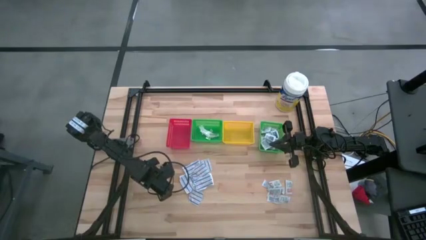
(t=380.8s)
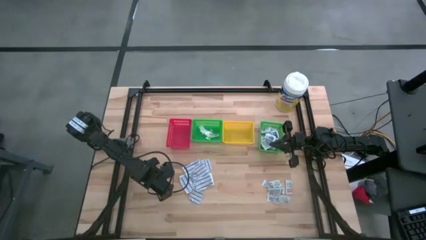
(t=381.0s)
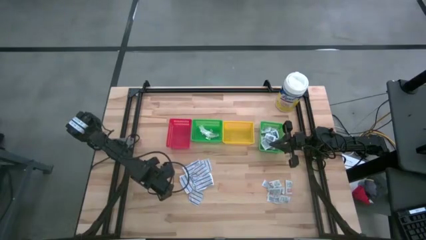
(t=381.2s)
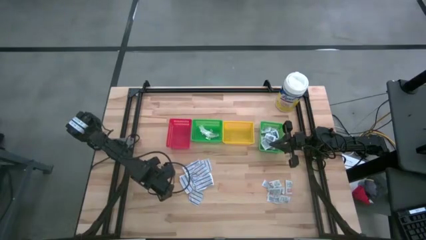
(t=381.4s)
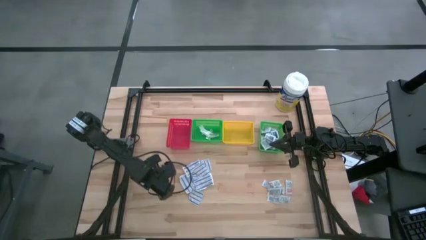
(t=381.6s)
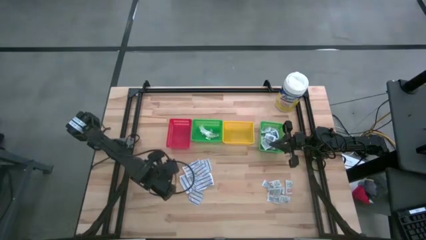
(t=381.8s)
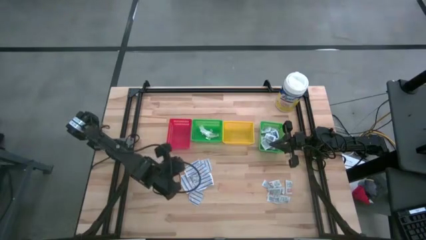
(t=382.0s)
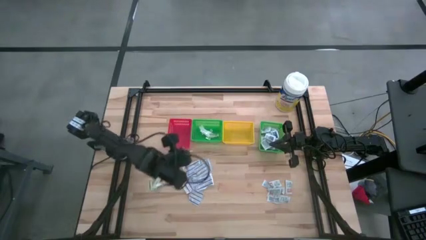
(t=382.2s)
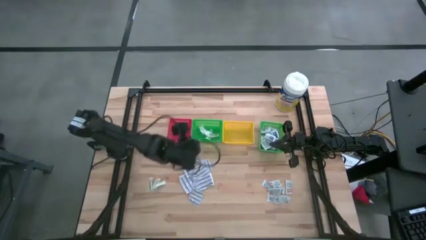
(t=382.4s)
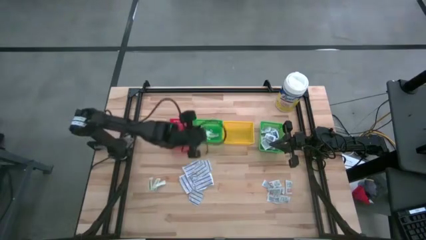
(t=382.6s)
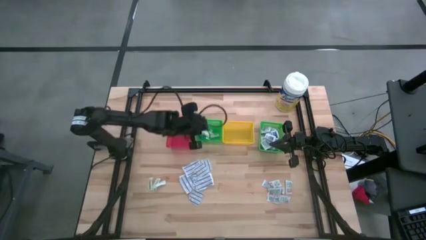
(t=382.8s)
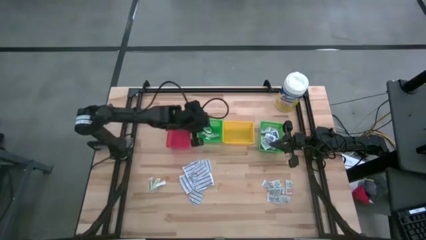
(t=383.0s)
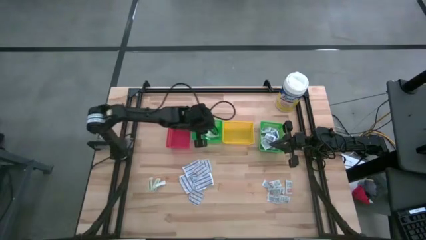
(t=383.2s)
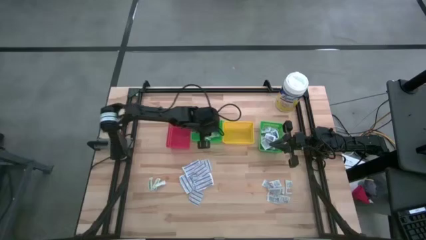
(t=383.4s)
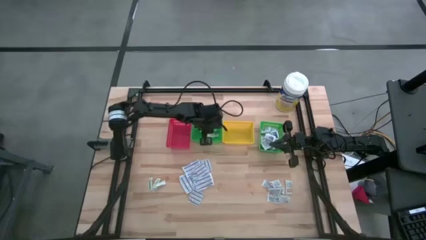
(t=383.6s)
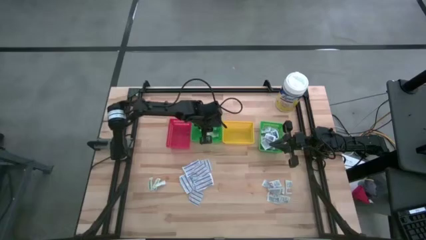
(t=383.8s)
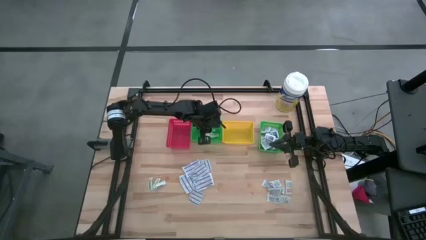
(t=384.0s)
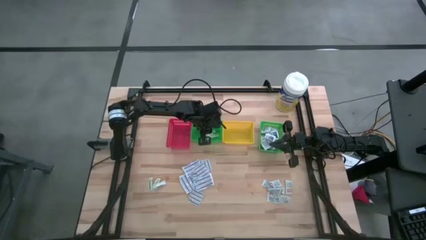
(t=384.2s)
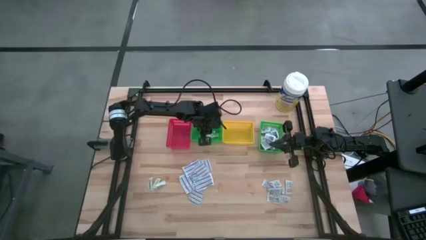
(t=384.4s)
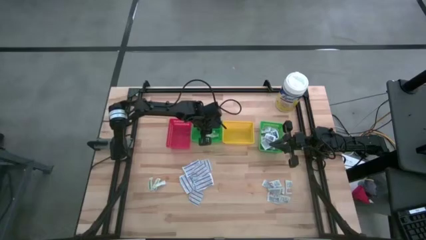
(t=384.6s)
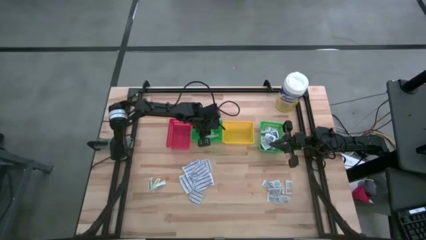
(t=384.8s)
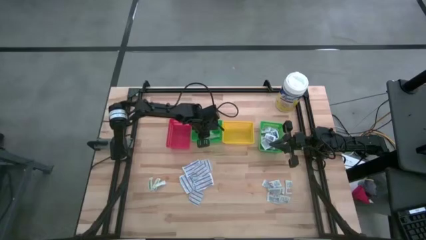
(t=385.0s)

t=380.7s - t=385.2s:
Task: Pick & Place First Aid Supplies
Put the green bandage into the left green bin

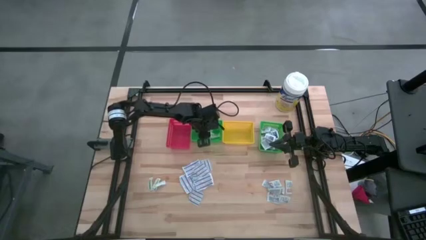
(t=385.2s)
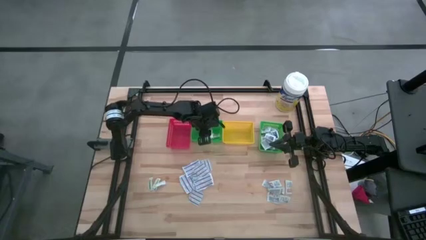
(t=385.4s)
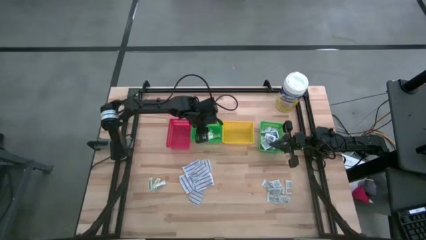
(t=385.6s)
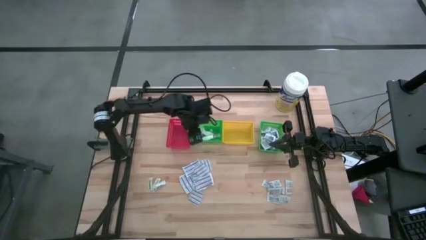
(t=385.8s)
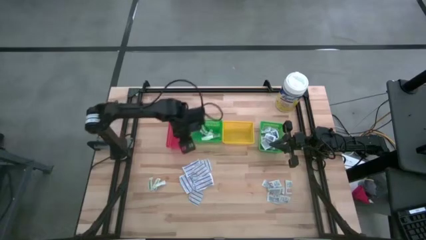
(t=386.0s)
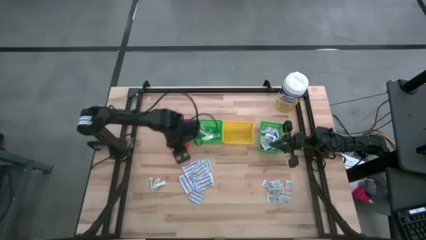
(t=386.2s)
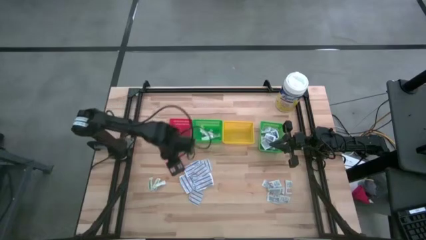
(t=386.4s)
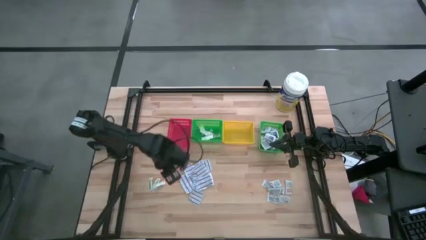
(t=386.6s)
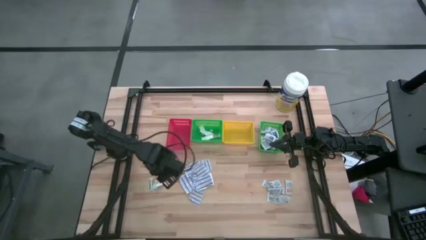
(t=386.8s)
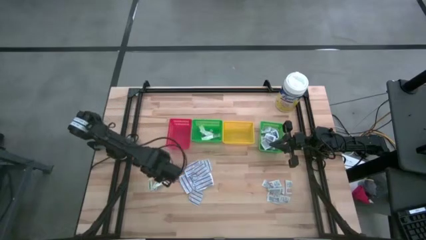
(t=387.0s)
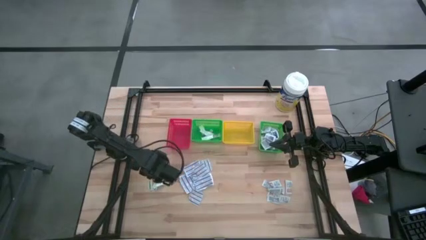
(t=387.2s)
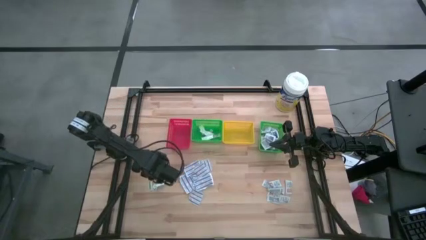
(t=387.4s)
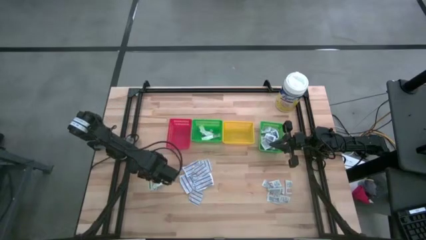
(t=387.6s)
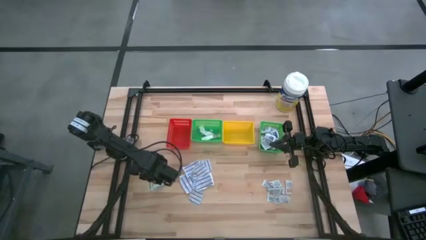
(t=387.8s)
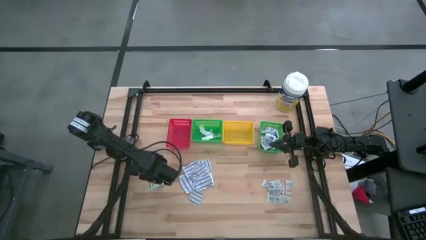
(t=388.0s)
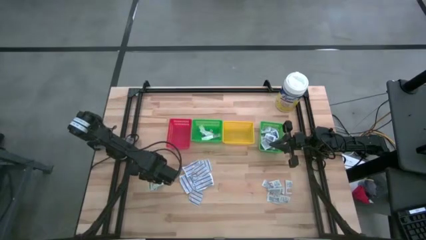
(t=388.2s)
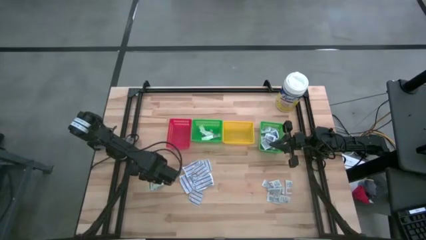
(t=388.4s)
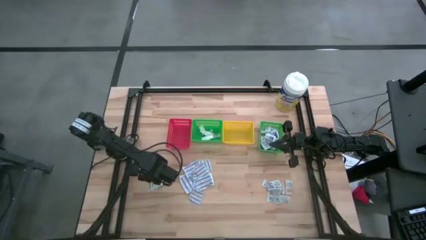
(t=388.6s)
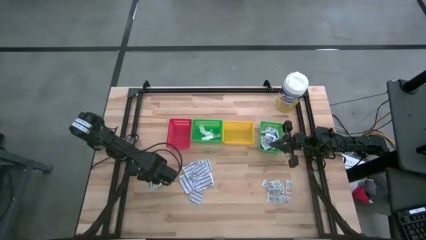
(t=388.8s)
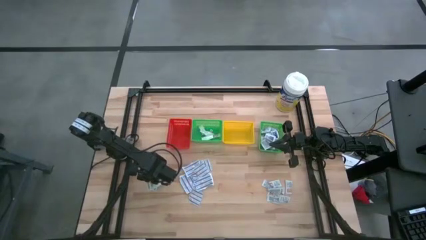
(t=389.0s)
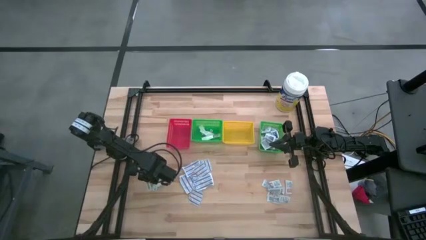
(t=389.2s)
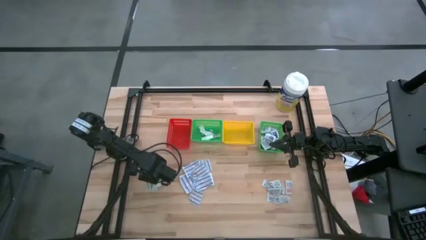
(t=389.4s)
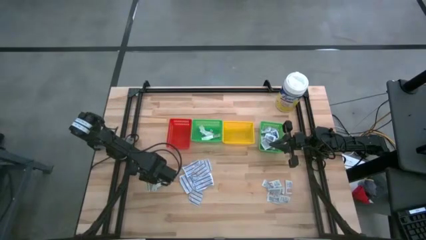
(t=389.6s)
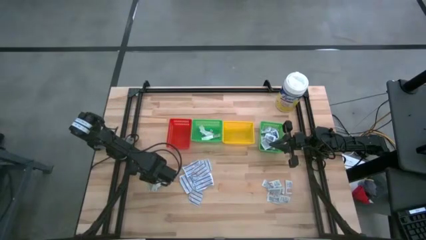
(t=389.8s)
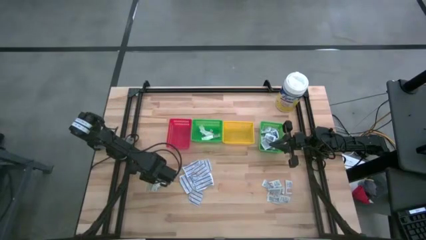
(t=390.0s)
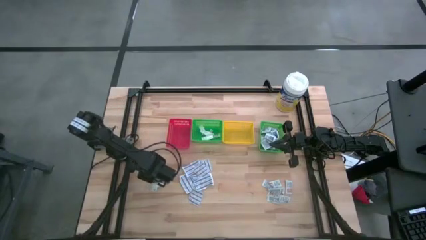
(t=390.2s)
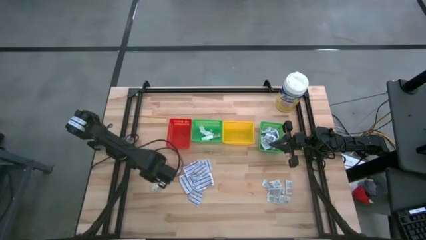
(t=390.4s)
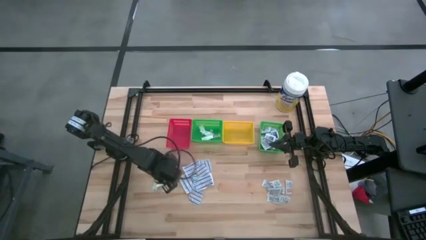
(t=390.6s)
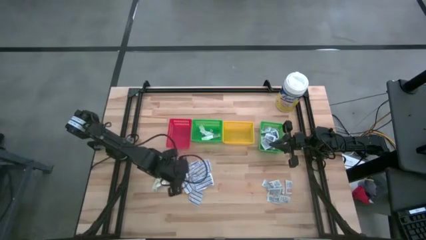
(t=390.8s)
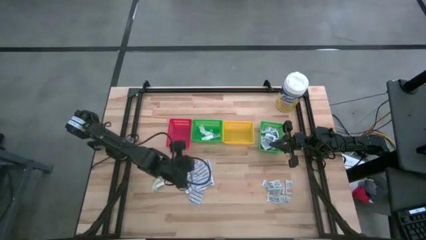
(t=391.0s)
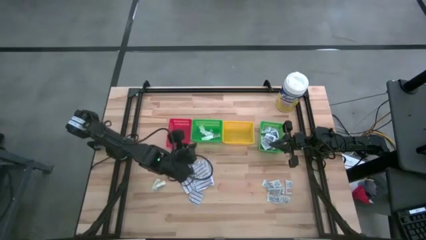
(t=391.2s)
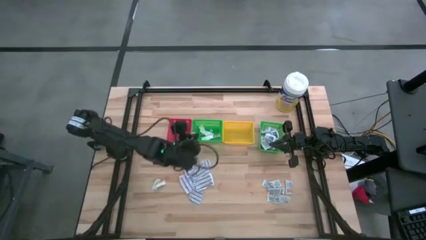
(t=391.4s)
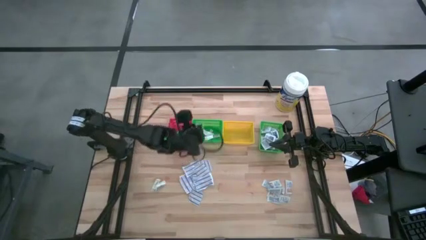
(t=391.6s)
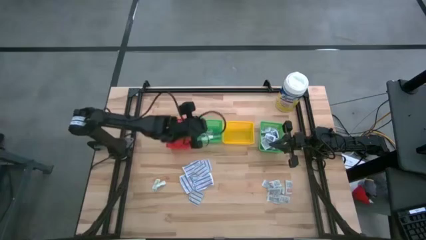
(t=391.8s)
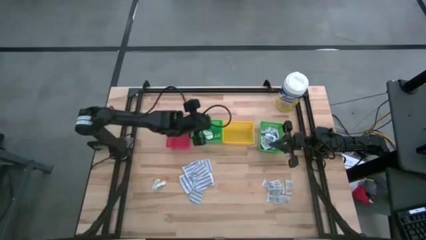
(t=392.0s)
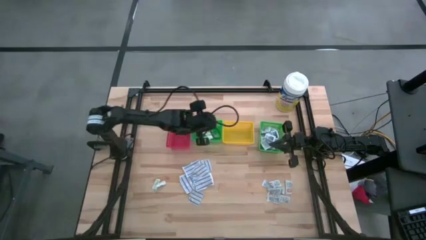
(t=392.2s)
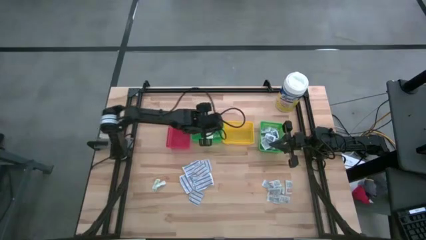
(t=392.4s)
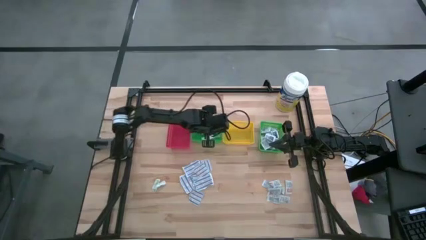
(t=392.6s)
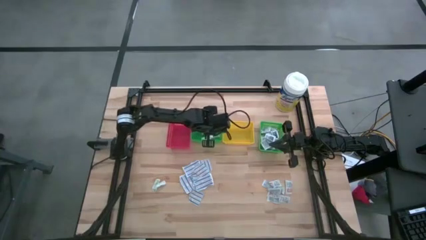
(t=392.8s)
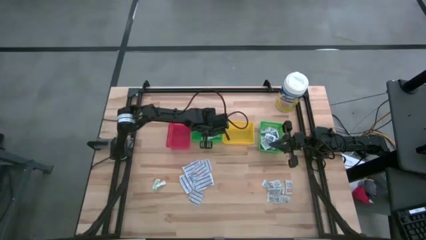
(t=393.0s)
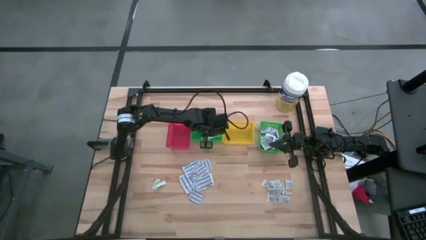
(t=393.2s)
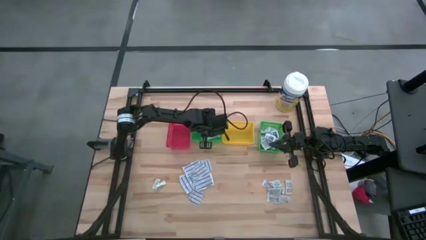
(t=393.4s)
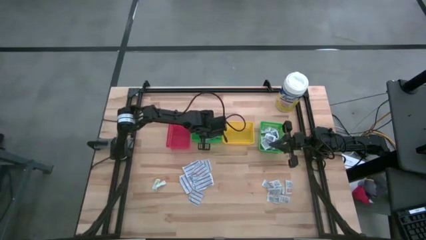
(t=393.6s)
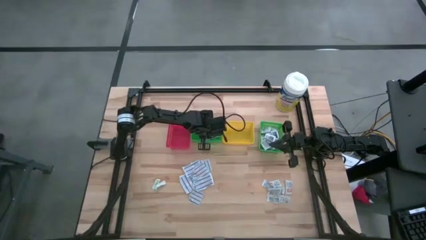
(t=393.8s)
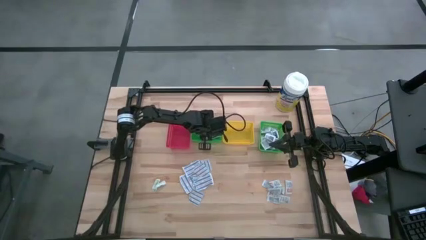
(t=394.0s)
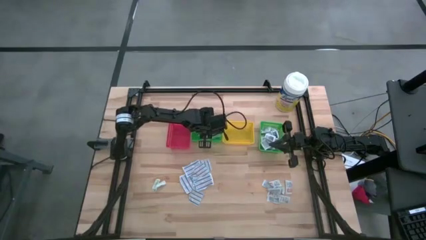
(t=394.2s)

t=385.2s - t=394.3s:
Put the green bandage into the left green bin

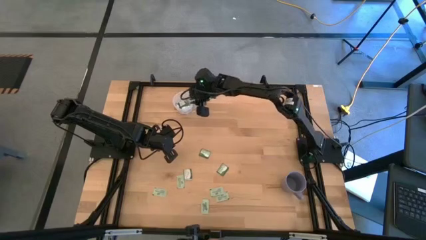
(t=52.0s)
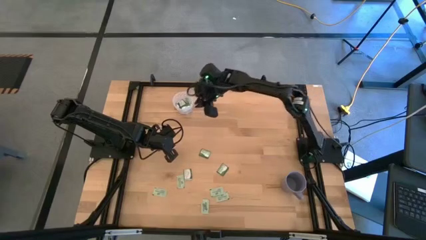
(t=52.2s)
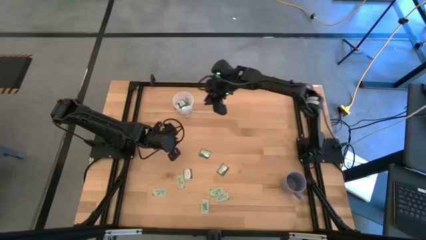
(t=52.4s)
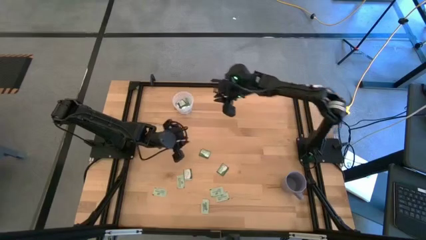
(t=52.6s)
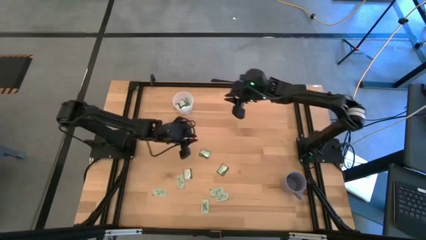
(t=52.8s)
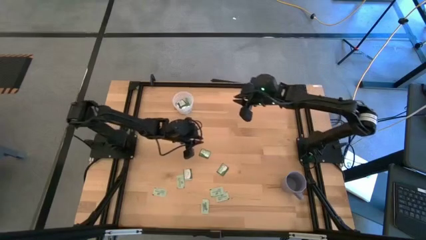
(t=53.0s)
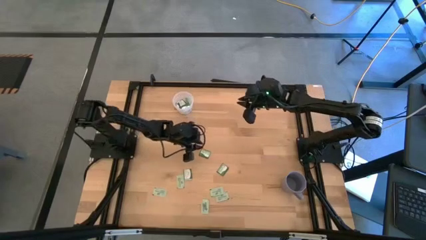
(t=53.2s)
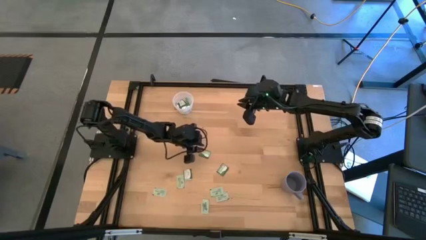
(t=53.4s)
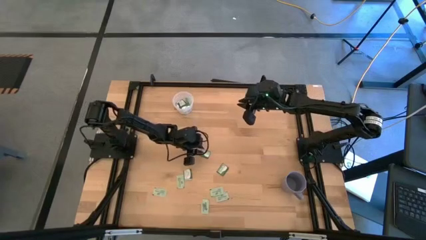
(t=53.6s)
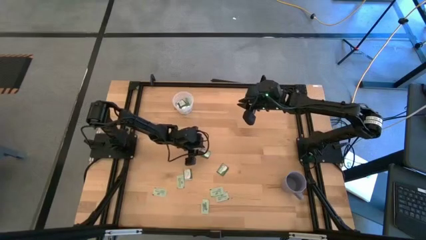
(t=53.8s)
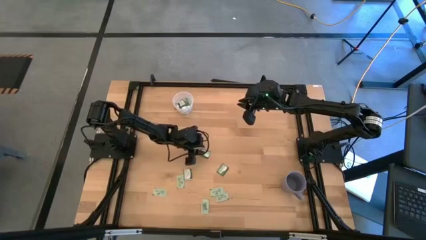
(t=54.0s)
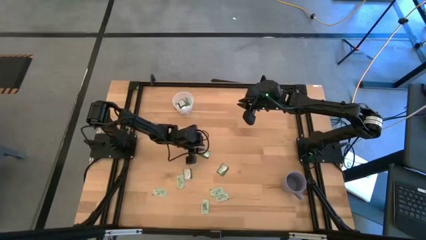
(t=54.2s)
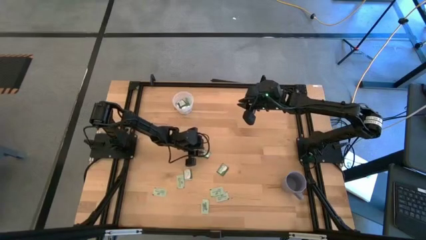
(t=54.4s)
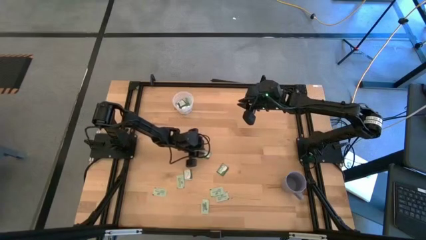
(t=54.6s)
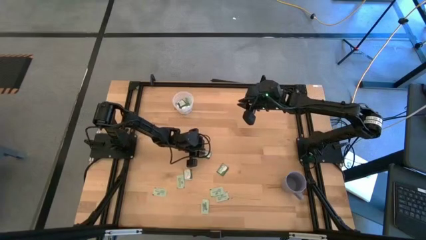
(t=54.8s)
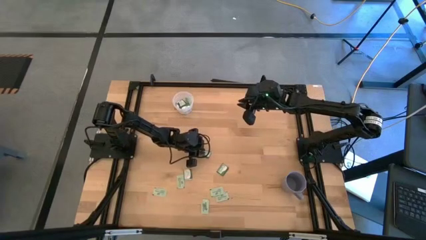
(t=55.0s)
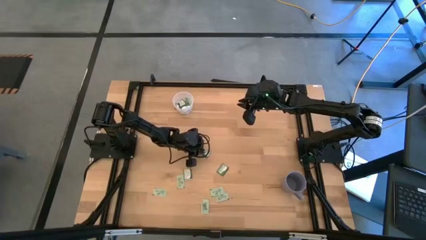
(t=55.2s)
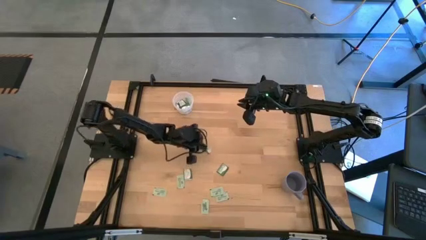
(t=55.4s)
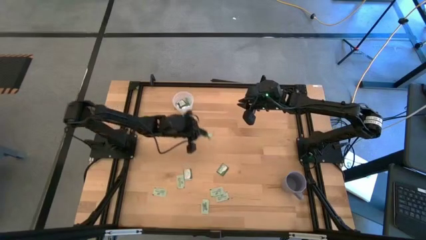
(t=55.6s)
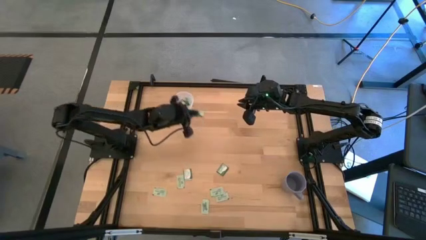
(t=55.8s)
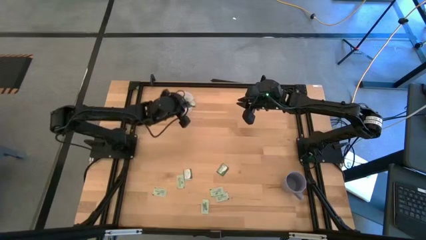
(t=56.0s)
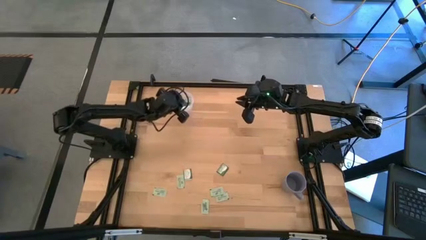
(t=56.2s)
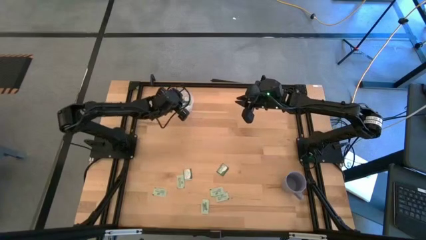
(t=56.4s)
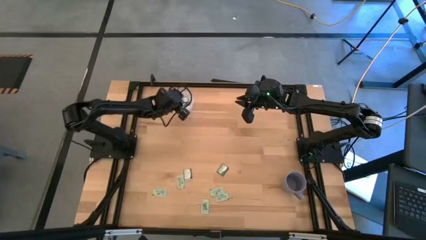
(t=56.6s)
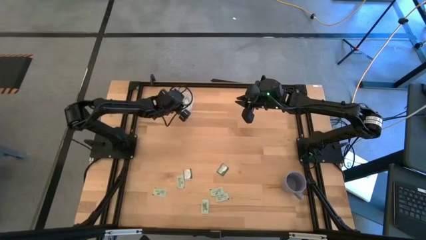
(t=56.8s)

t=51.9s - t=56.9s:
Task: Pick and place items into bin
Put the truvia packet into the transparent bin
